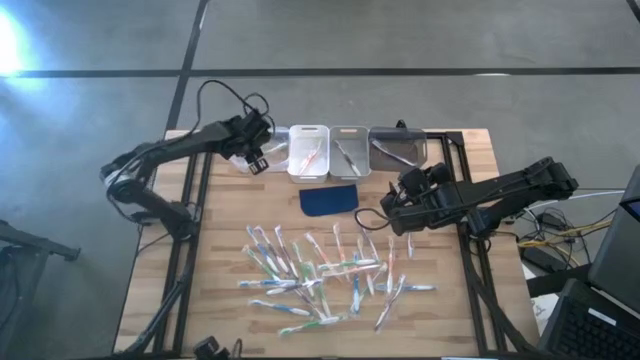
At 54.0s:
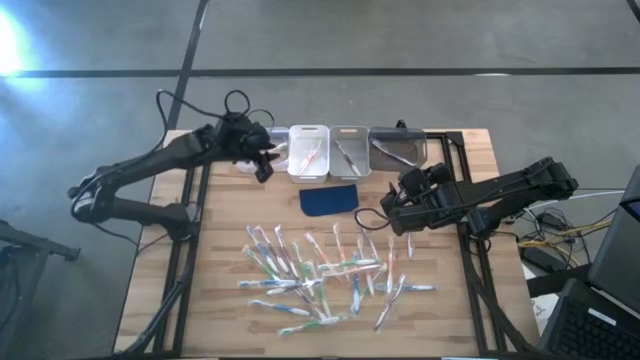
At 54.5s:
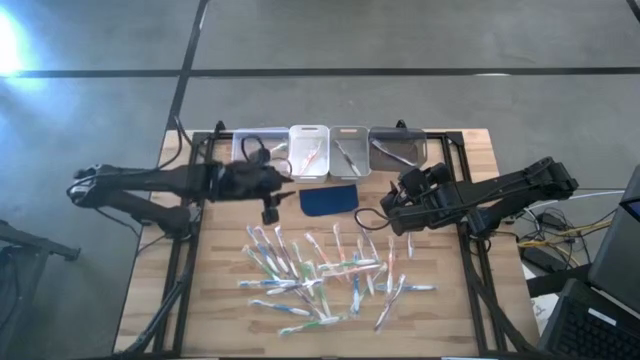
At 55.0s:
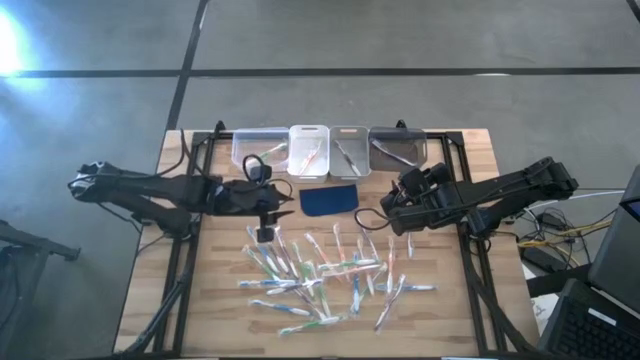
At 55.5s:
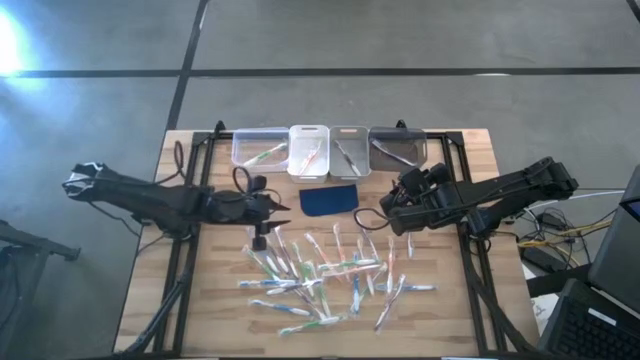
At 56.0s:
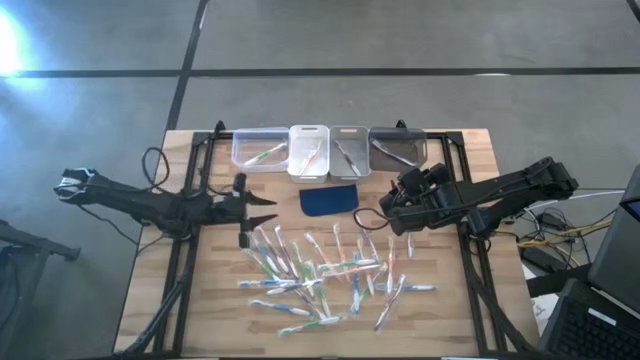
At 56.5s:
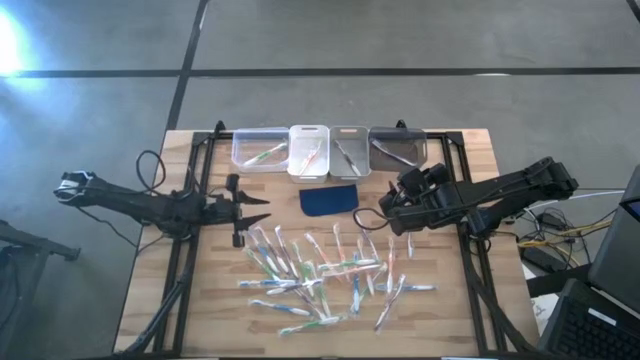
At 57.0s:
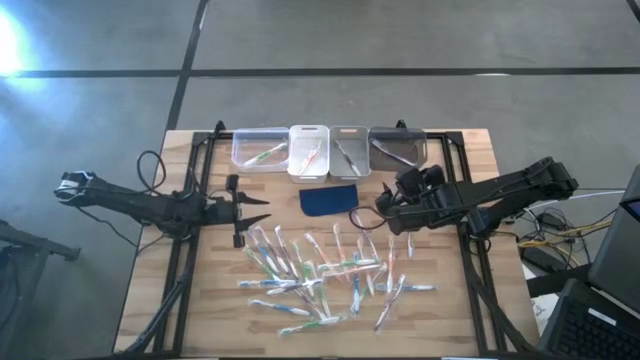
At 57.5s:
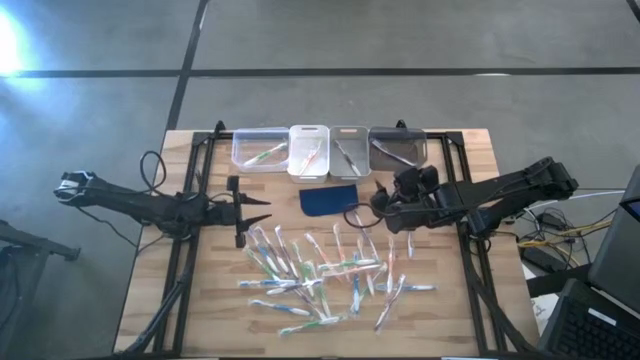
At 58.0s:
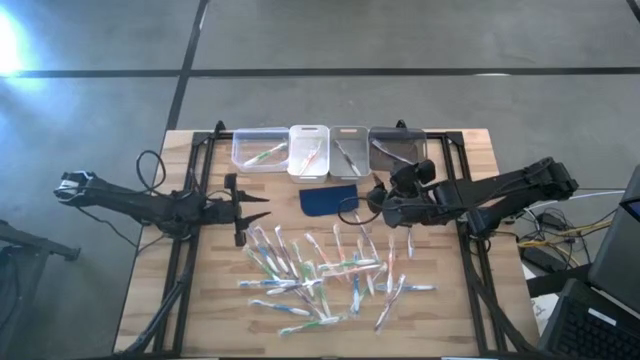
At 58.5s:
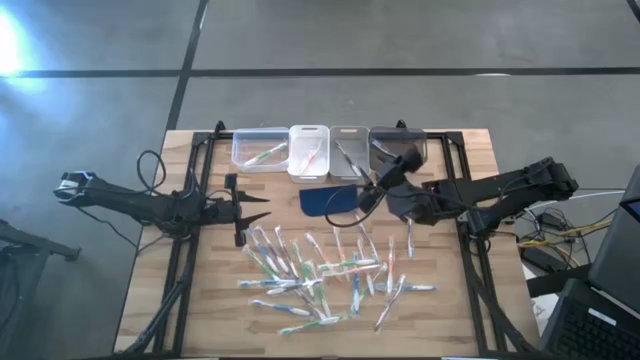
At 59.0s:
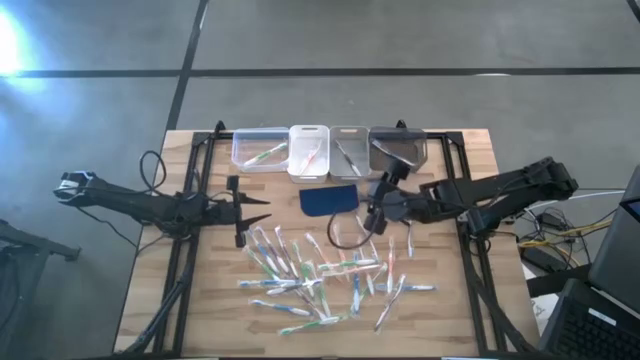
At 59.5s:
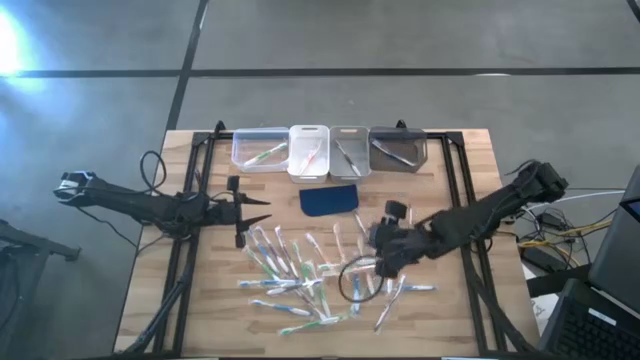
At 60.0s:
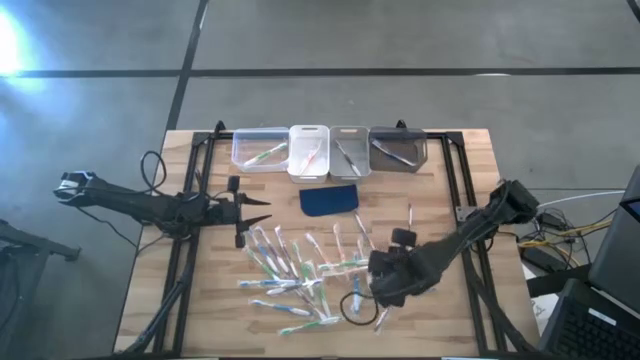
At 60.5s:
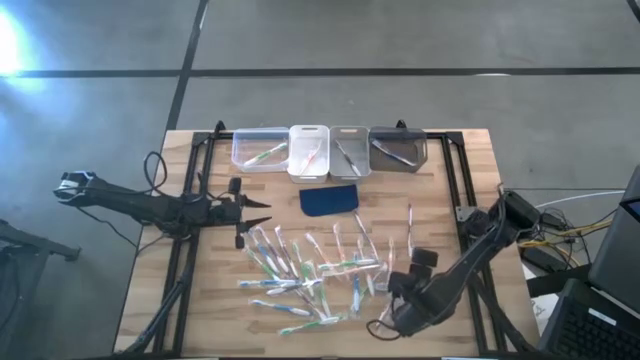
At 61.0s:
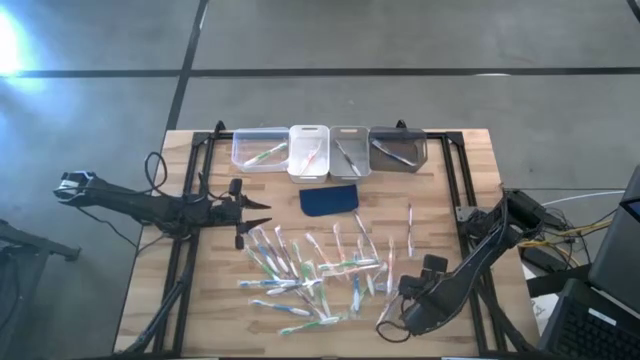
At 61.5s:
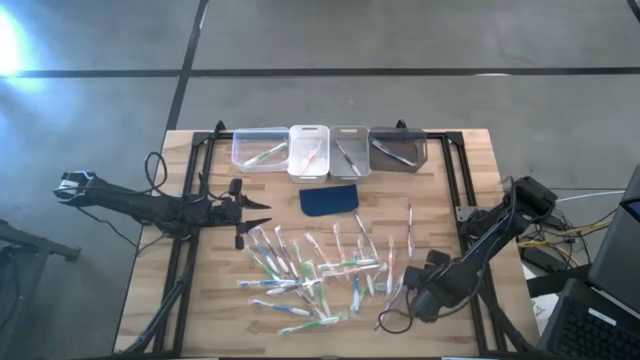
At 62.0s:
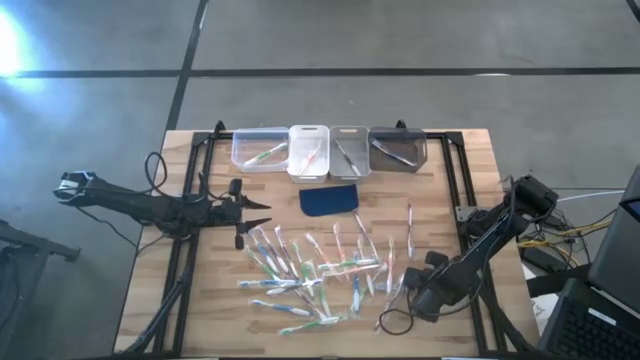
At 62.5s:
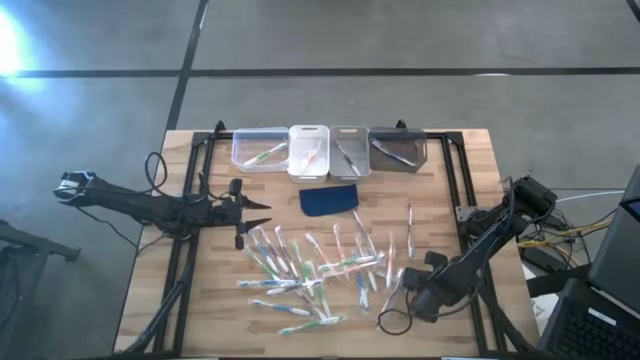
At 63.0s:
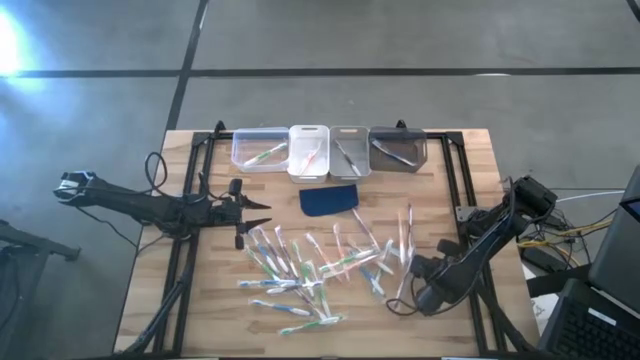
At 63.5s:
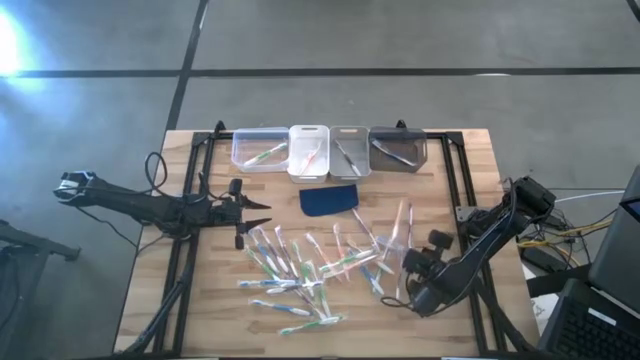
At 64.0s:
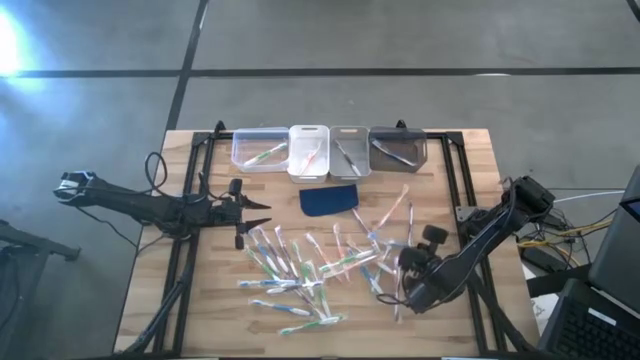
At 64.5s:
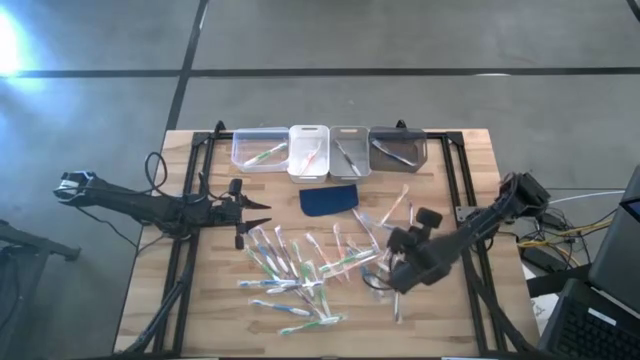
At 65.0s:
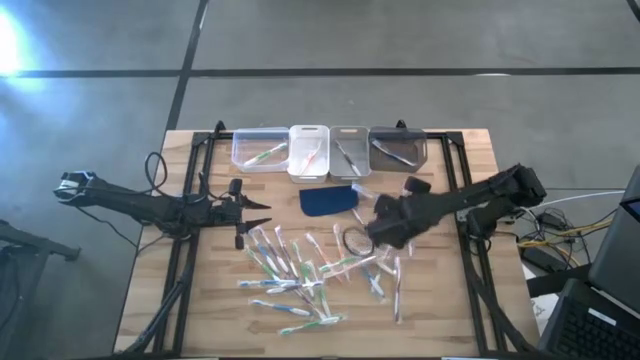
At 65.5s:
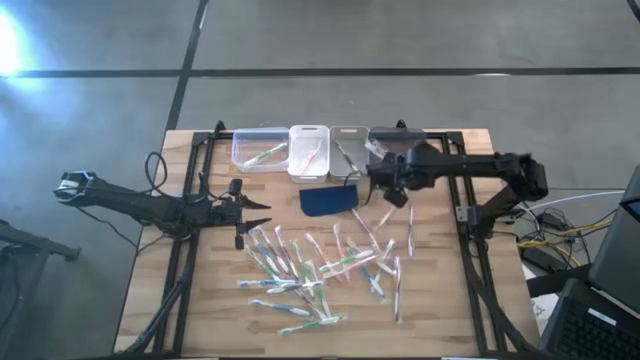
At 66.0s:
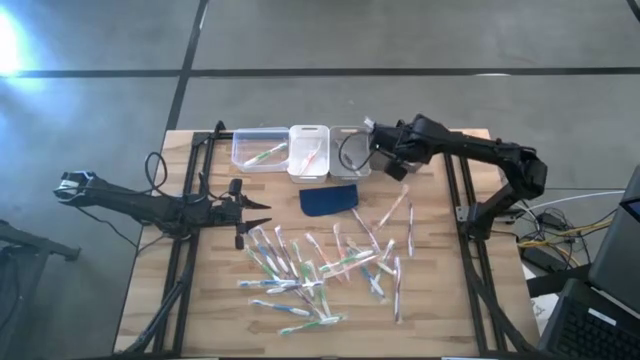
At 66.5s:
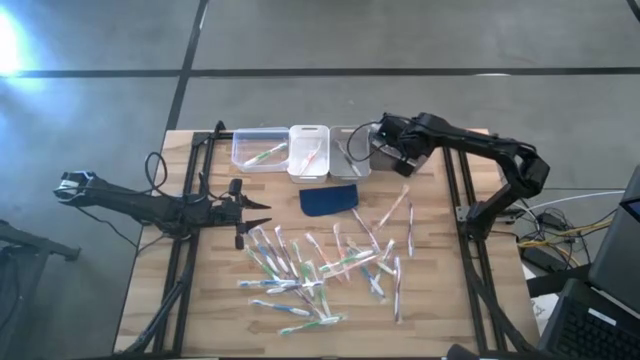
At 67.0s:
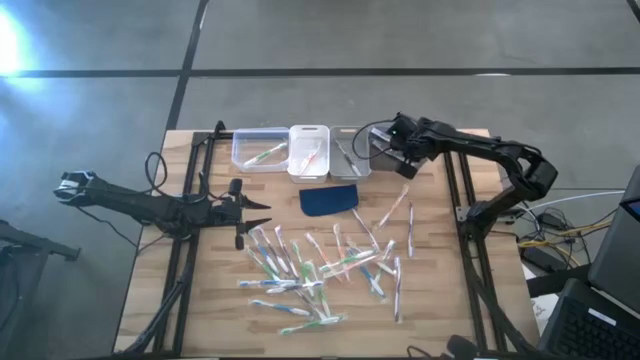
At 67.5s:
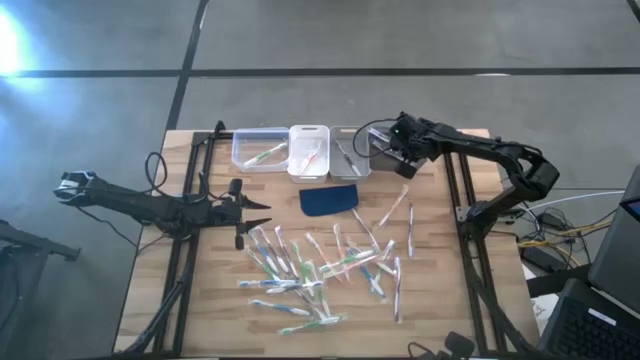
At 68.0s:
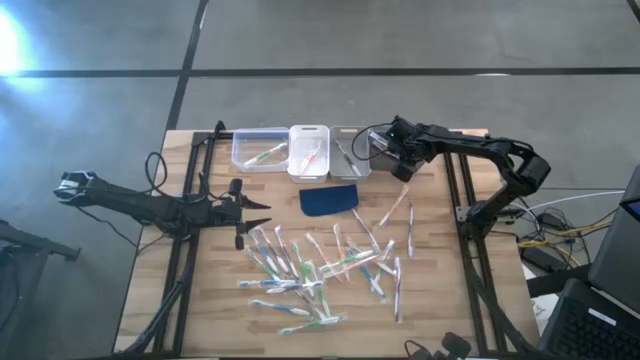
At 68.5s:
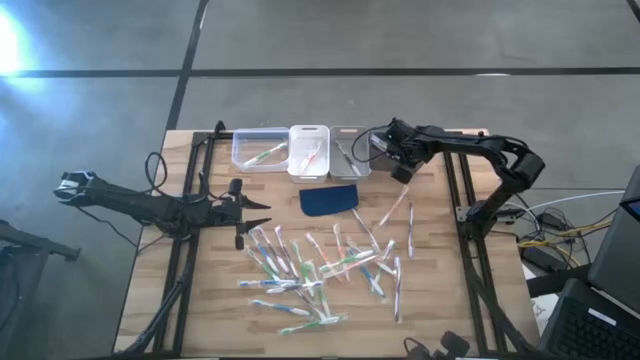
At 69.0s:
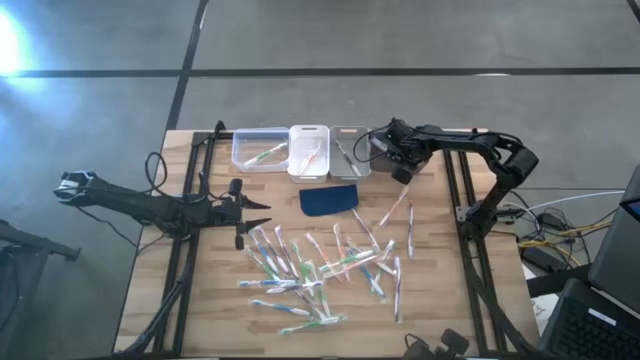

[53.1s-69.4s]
Task: Pick & Place Toothbrushes
Put the blue toothbrush into the transparent black bin

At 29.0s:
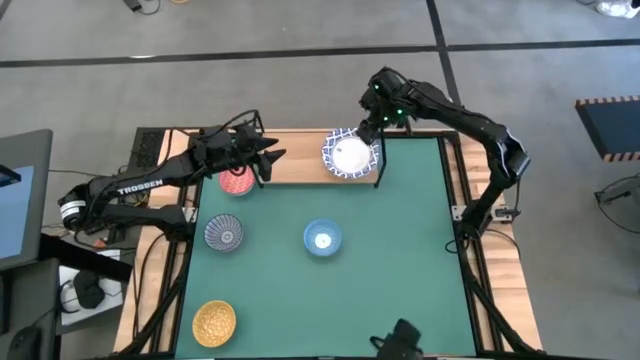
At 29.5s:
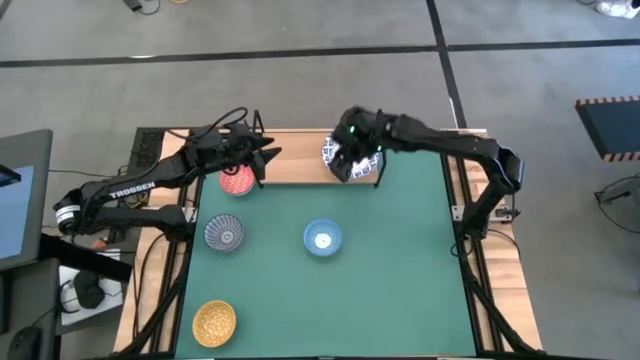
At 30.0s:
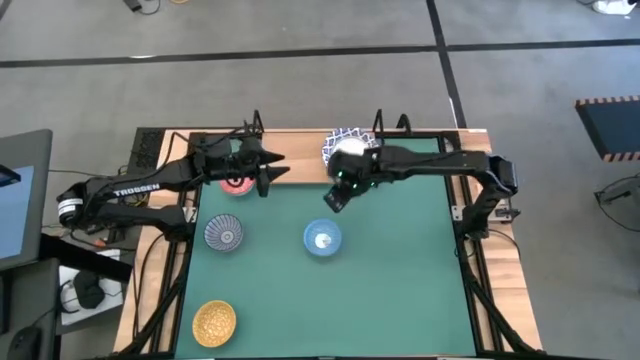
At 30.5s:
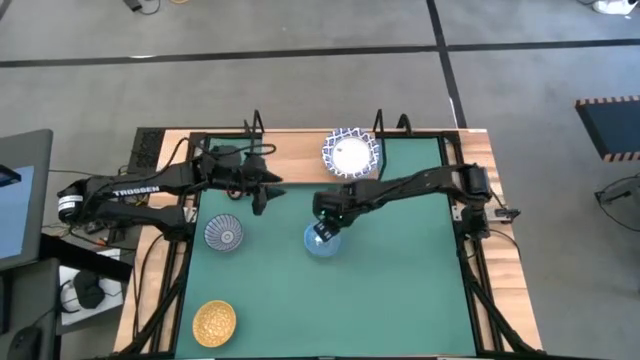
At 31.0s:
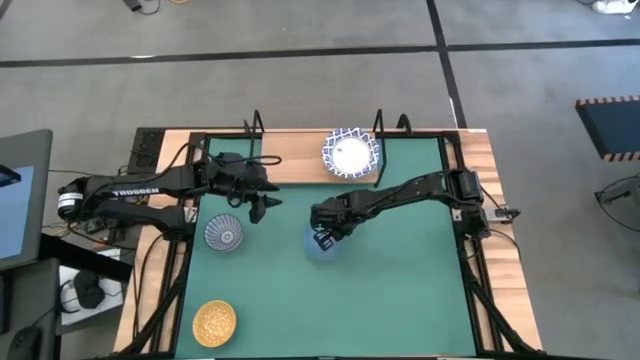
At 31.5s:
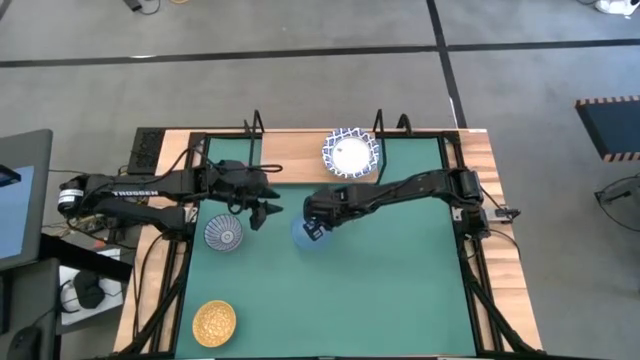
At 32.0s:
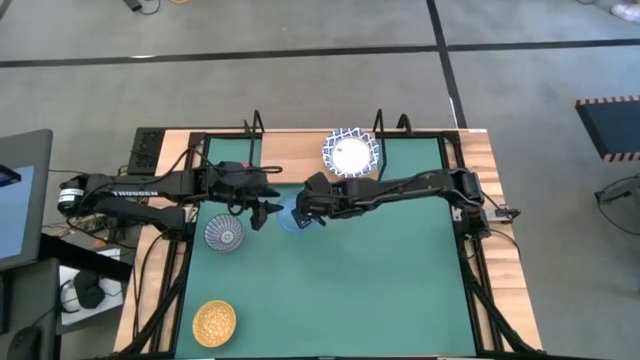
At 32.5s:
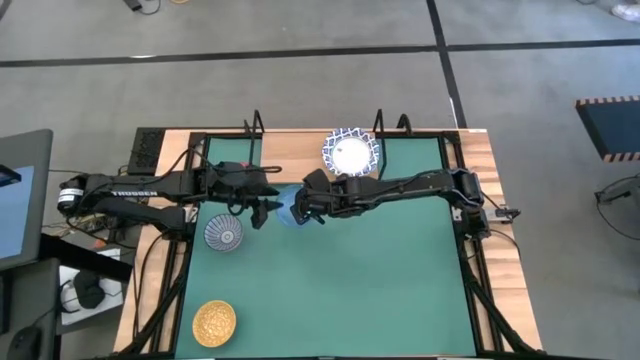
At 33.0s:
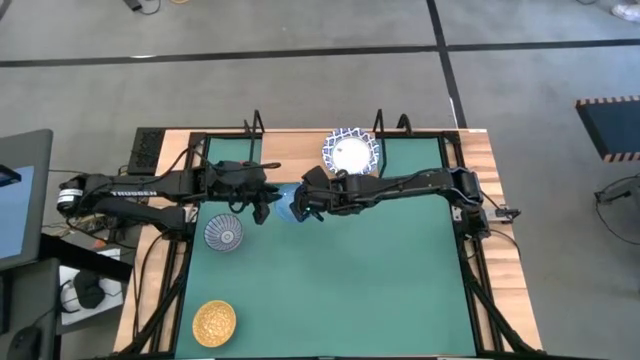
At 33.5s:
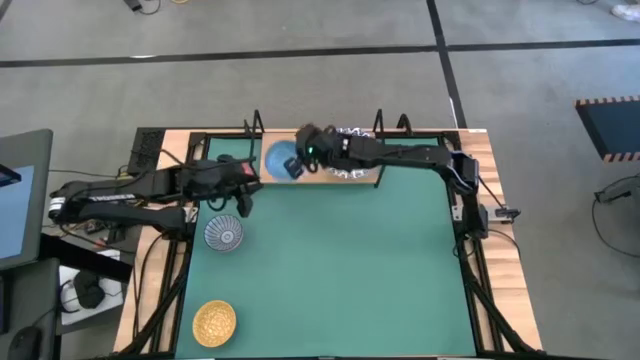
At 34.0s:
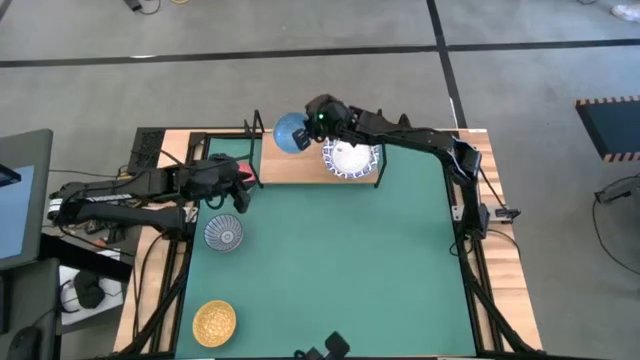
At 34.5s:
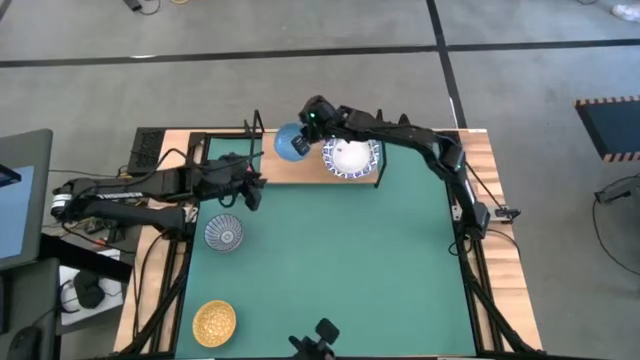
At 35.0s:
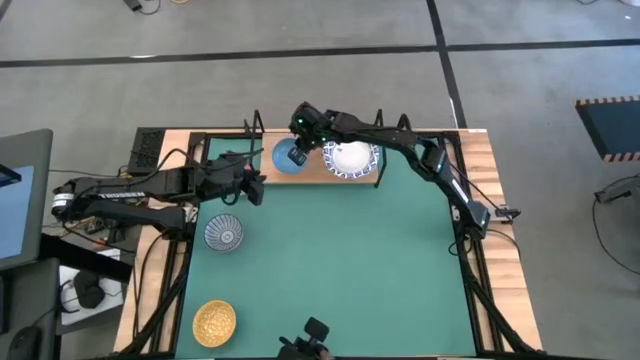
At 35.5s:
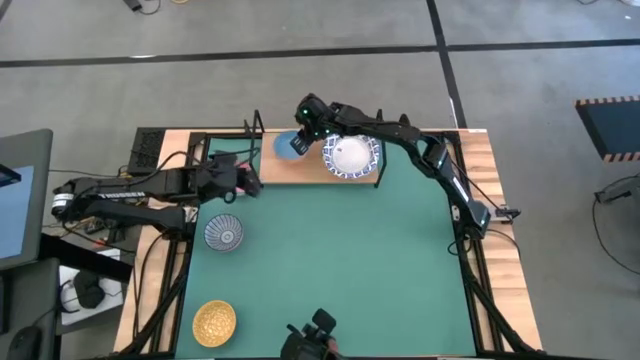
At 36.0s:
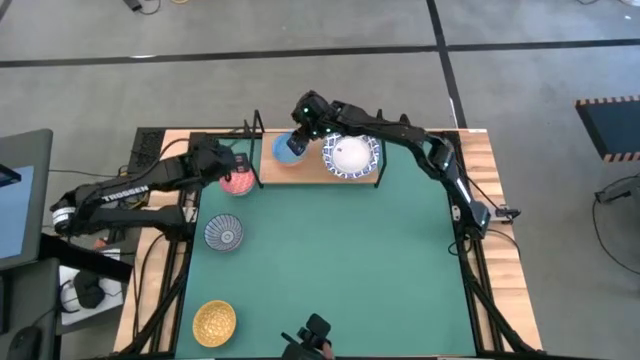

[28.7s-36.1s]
Task: Place and stack bowls onto a shelf
Put the right blue patterned bowl on the shelf
